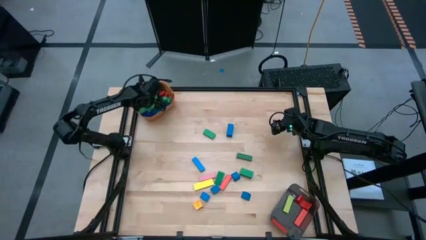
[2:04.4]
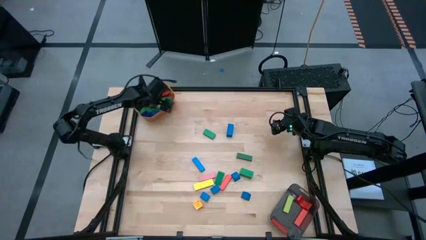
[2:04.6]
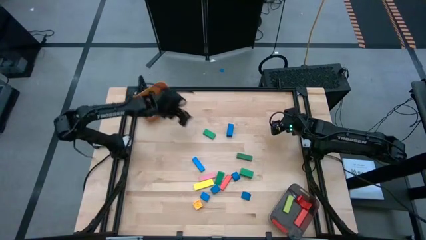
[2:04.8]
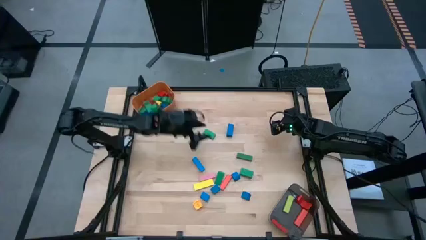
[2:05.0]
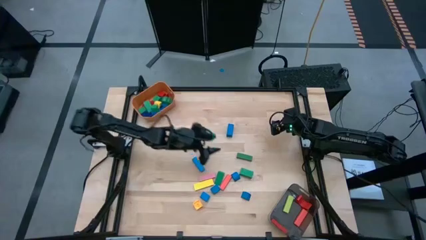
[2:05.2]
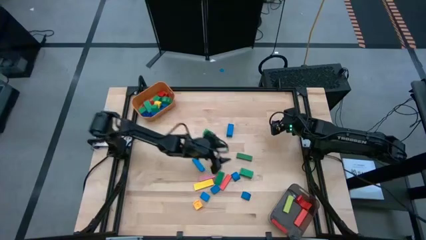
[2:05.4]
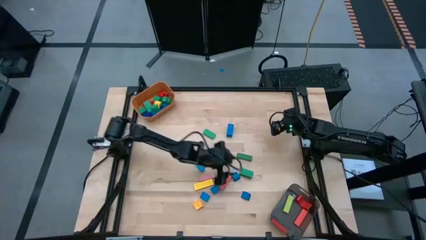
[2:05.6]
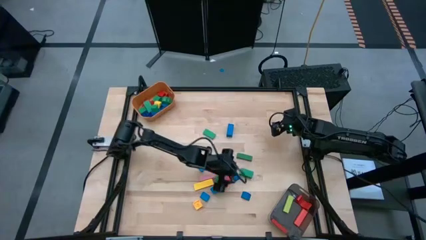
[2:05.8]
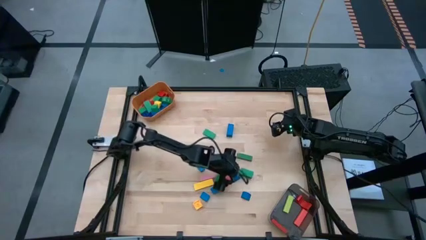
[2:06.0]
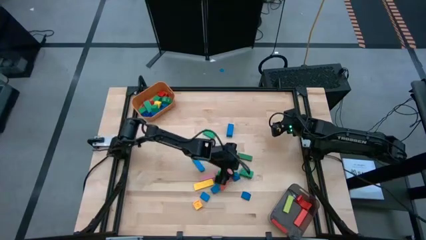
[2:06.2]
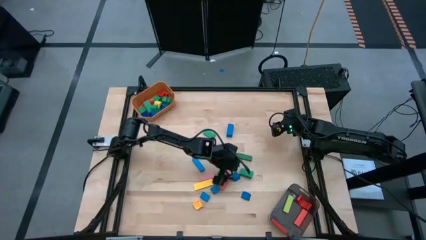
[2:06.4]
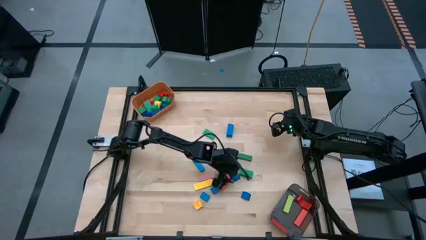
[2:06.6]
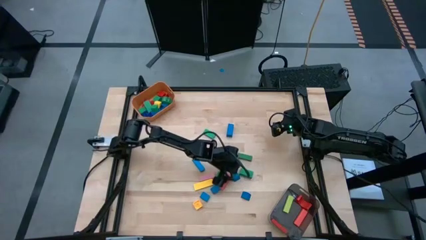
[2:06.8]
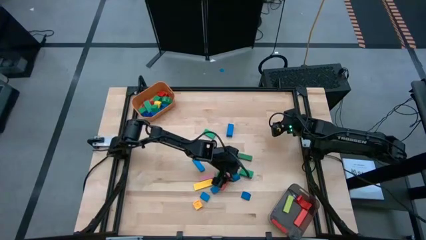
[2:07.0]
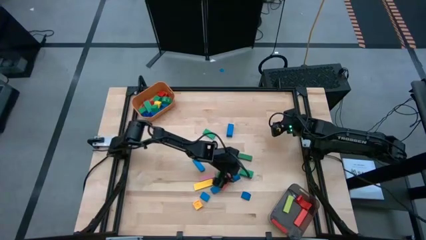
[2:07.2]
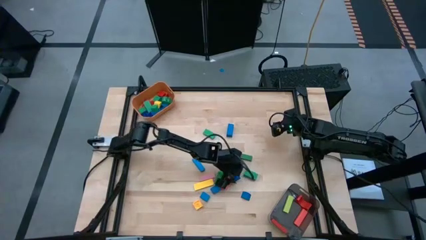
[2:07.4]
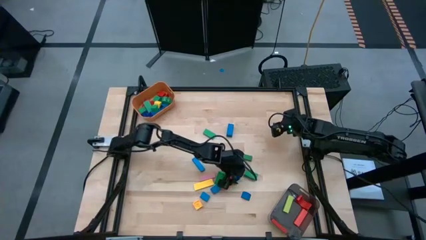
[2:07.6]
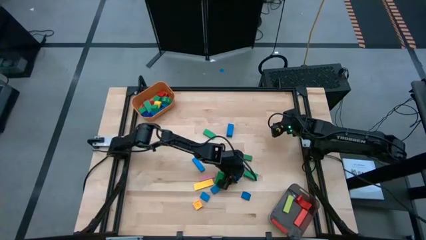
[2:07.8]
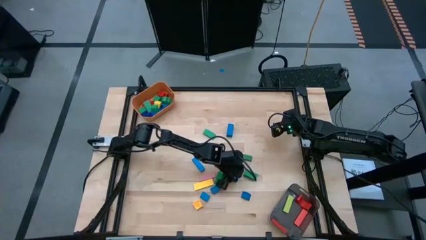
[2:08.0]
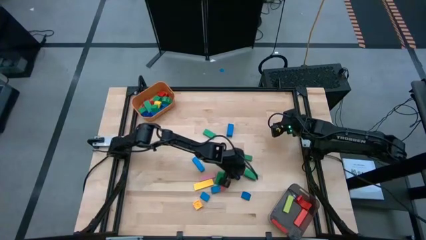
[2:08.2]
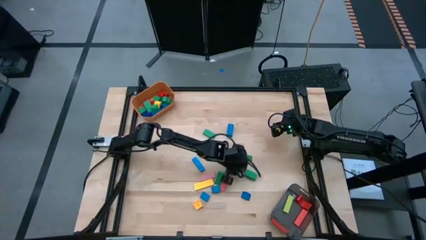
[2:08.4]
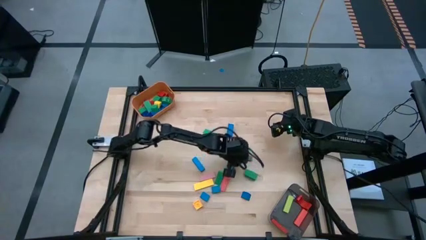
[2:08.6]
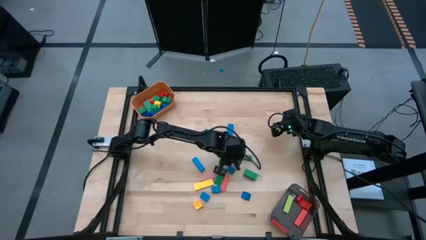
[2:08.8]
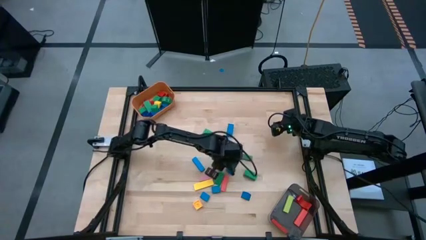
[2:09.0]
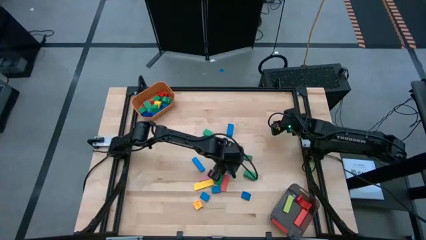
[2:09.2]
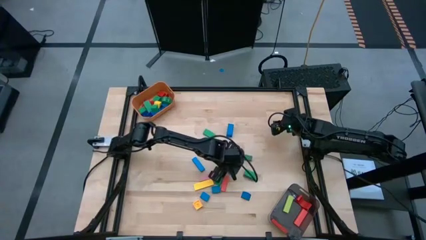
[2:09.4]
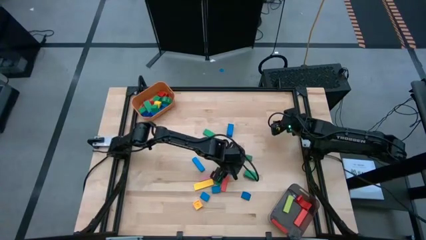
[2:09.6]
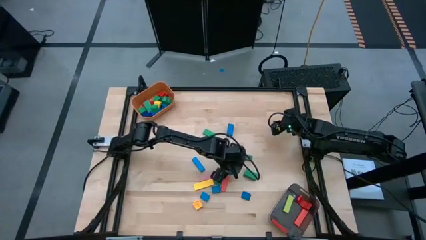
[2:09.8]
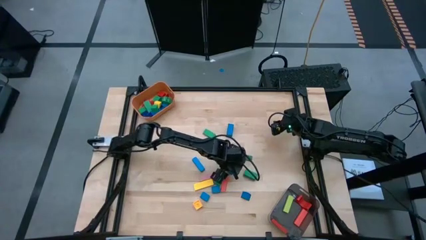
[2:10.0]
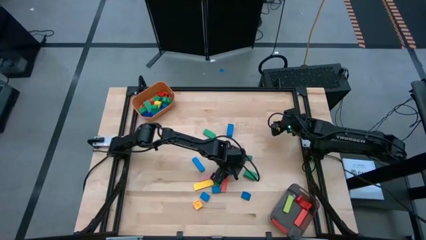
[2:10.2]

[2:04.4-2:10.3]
Task: Sort blocks by size
Put the small blue block into the orange bin

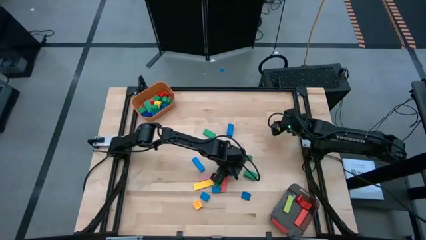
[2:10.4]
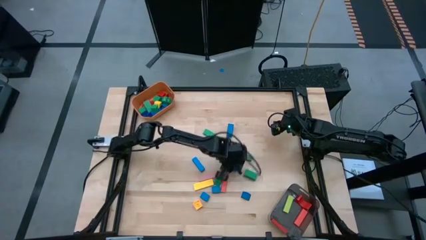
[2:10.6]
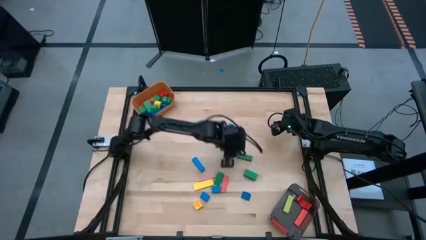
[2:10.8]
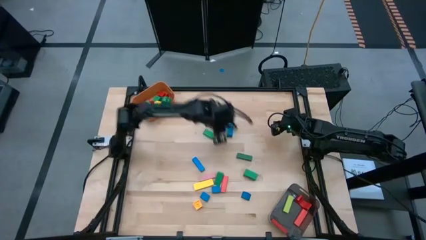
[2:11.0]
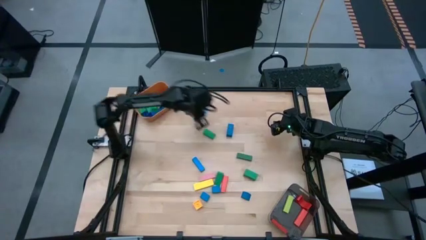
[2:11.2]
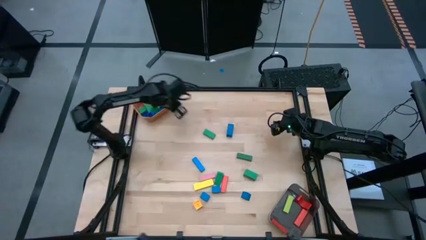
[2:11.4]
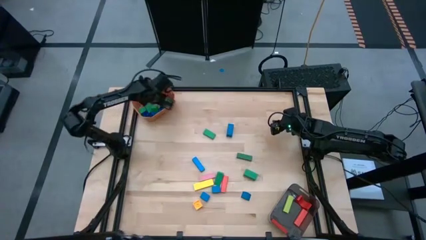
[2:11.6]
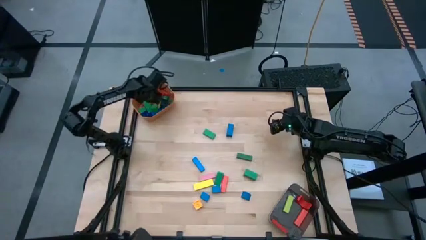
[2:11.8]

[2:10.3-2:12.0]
Put the small blue block into the orange bin

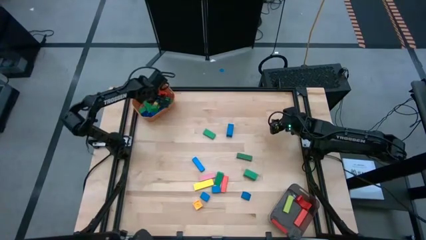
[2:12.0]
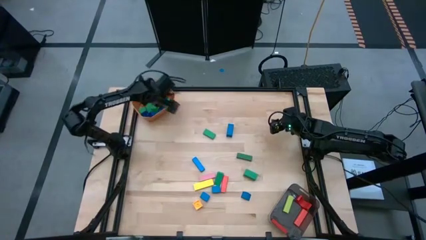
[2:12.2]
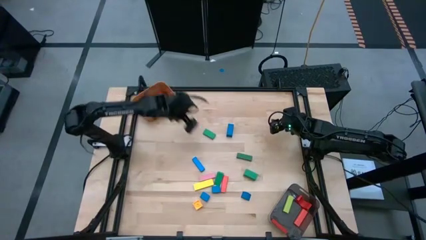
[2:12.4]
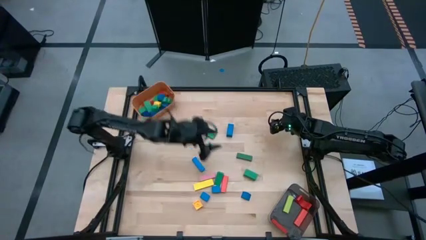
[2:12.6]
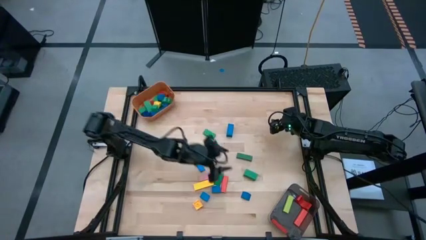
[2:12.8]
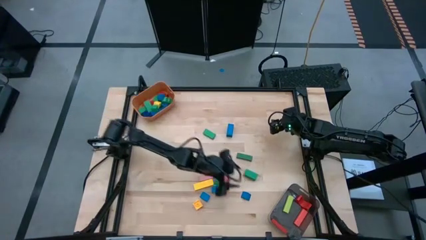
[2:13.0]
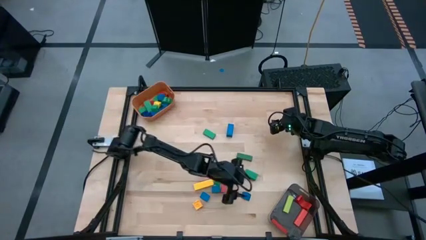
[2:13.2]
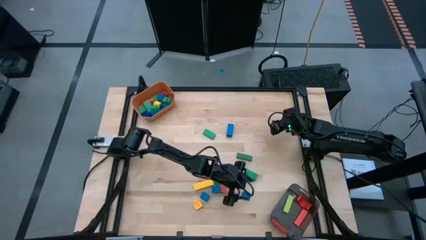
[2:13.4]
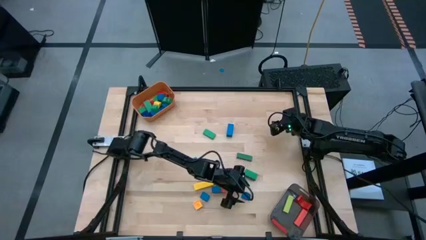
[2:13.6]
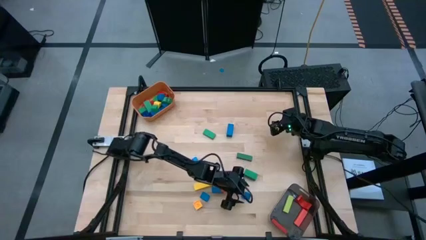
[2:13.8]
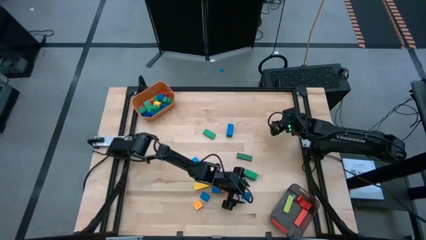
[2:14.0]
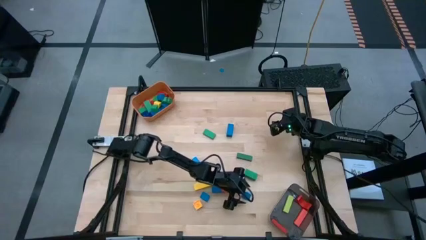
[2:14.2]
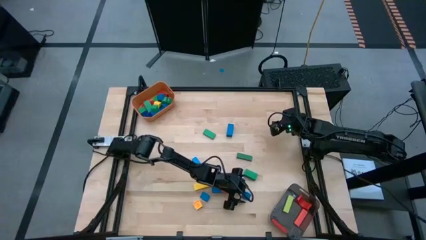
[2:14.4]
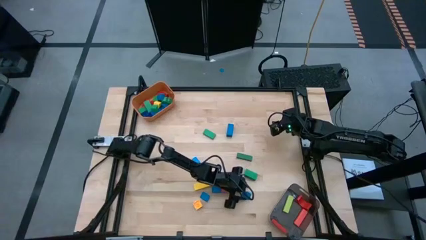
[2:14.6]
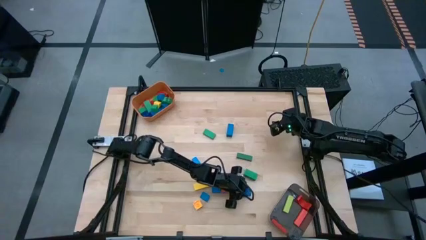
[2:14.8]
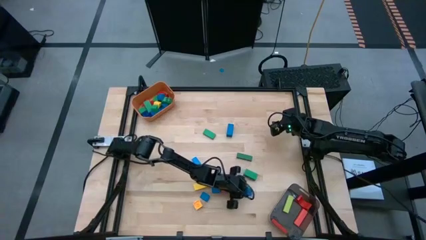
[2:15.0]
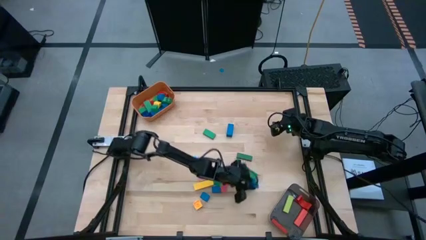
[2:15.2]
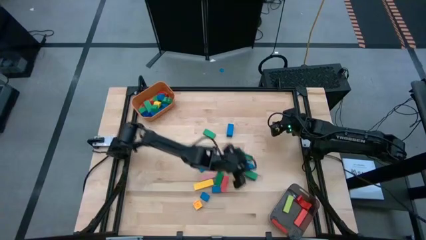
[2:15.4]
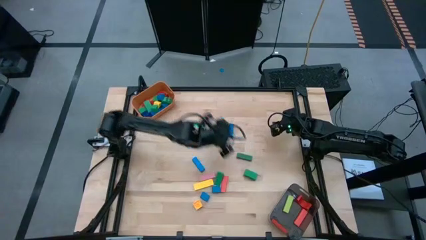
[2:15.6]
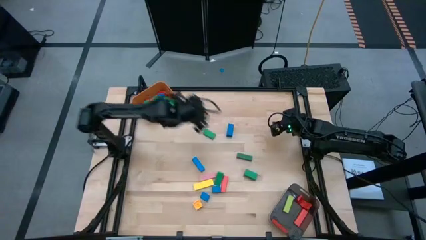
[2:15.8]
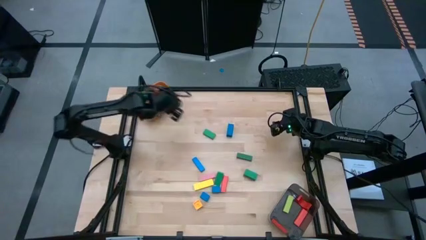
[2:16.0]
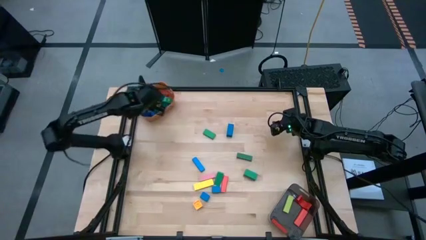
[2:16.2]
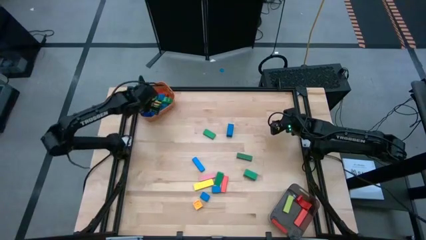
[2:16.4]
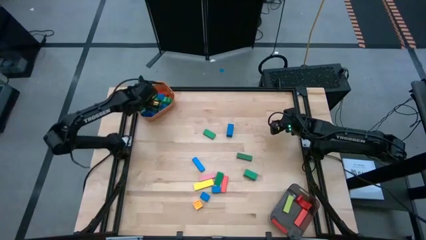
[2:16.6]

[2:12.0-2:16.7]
Put the small blue block into the orange bin

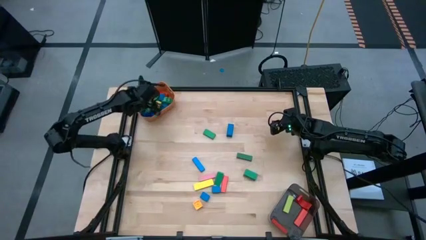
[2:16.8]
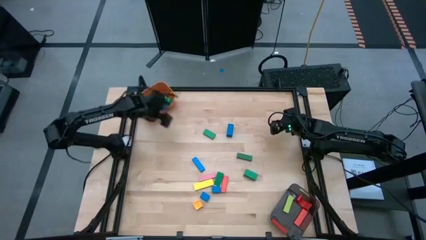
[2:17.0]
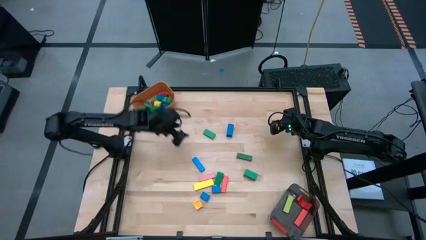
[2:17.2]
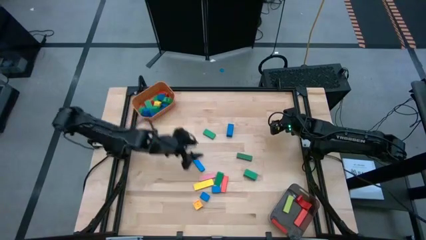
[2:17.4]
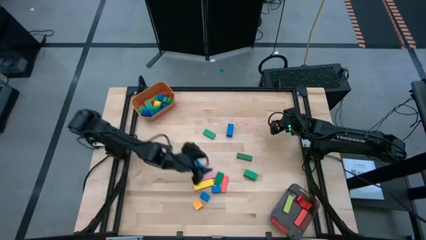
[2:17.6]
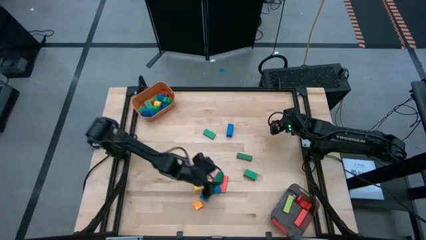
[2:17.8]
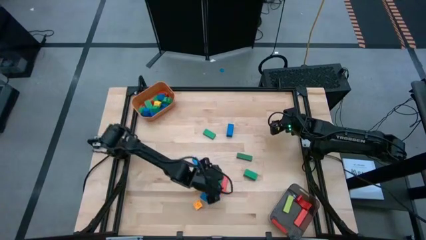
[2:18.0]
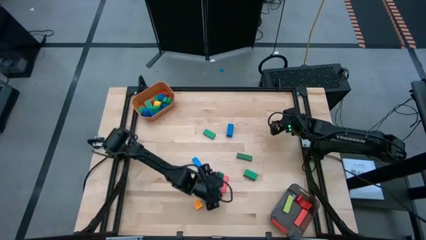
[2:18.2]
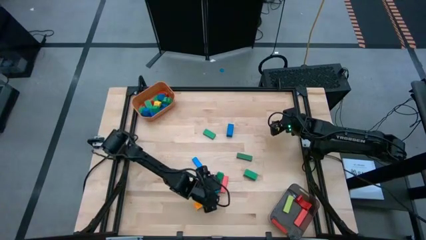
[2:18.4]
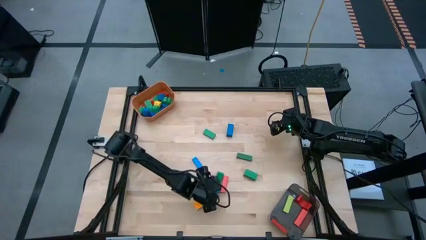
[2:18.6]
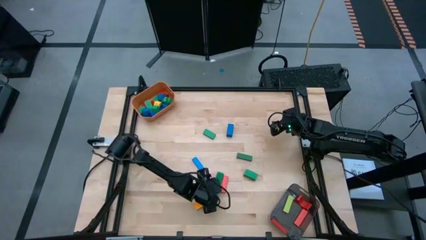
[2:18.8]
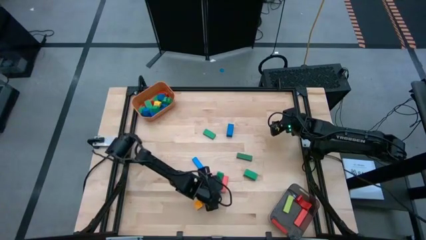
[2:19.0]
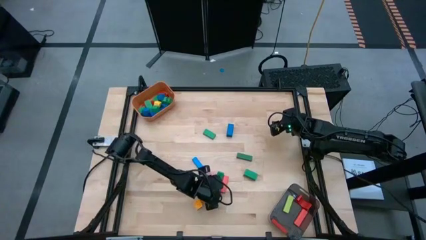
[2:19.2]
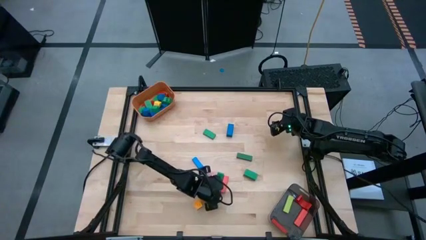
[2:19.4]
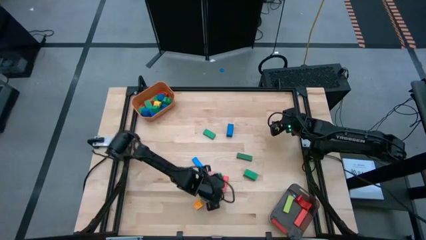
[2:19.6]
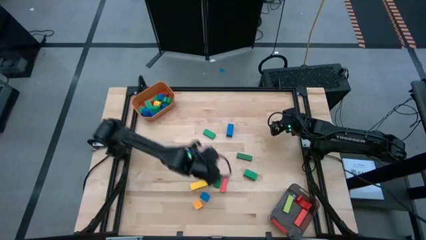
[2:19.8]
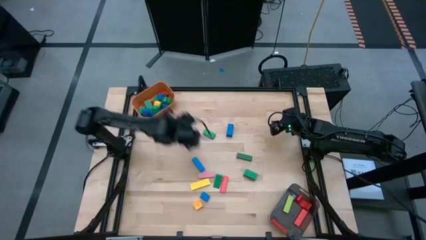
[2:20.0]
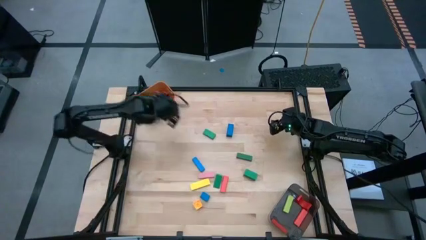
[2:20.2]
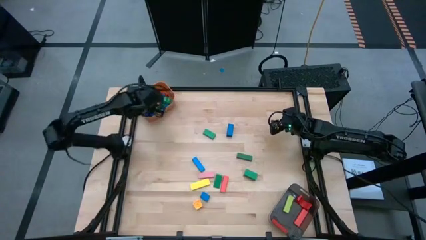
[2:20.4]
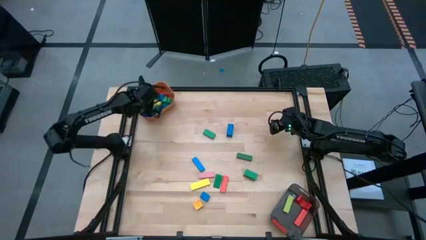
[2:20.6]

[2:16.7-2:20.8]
Put the small blue block into the orange bin
